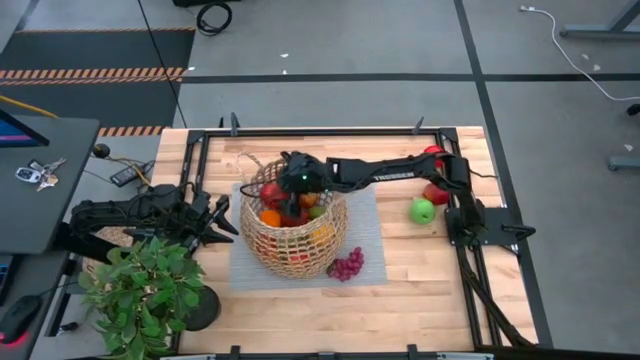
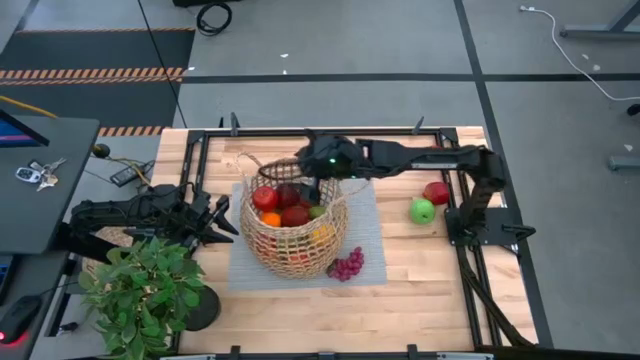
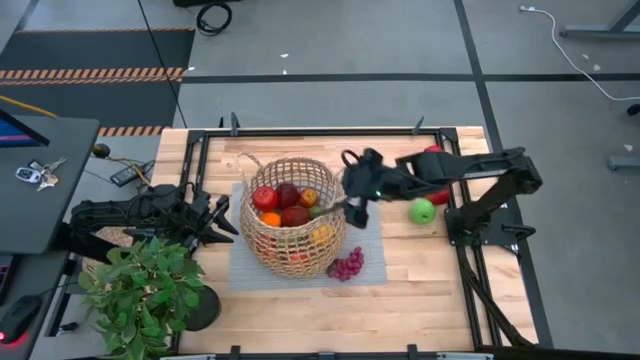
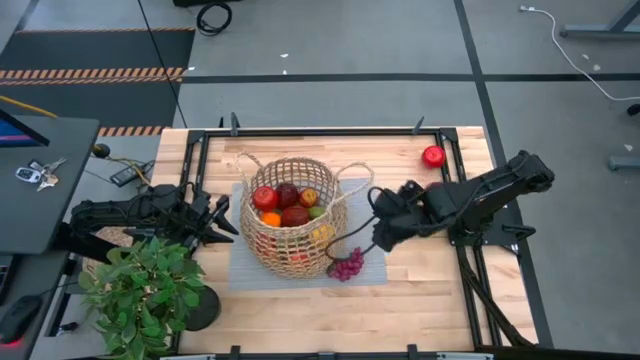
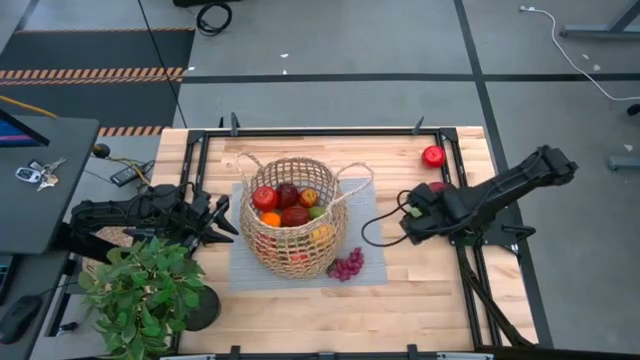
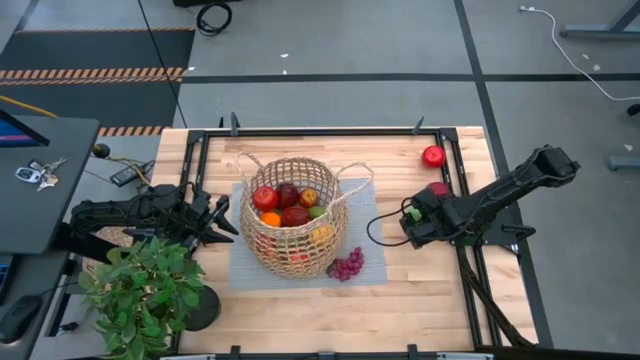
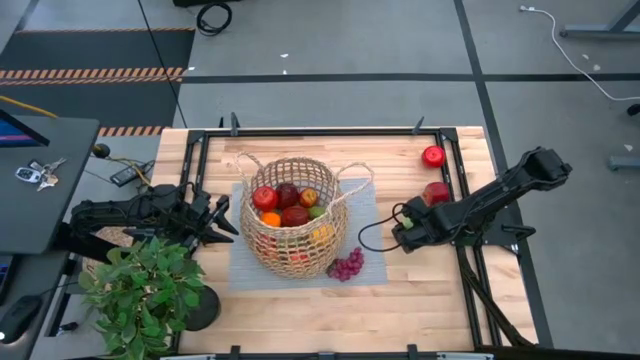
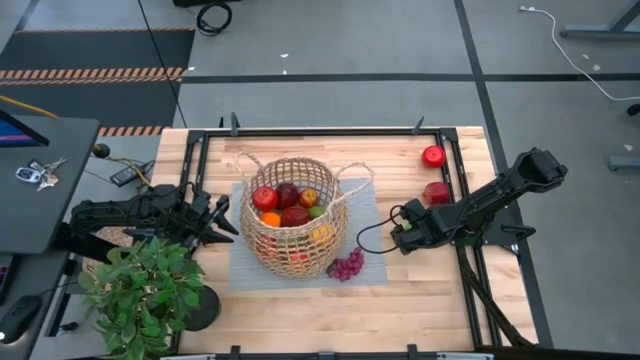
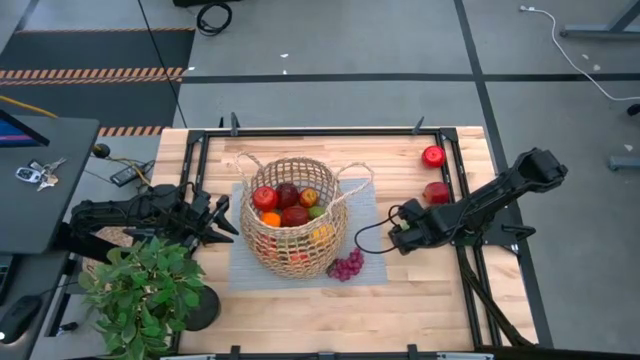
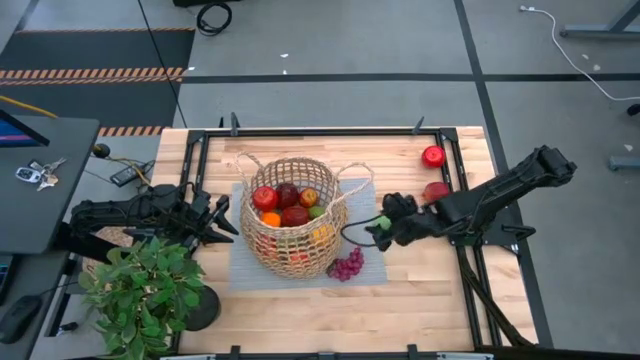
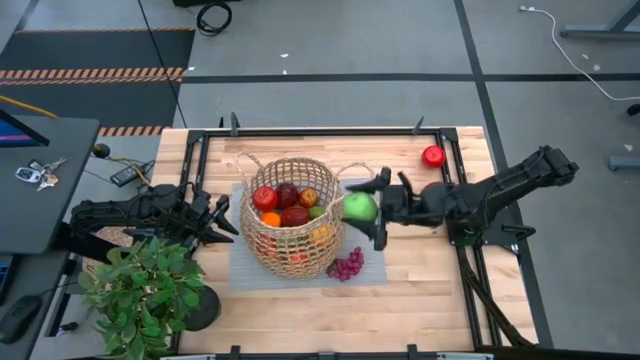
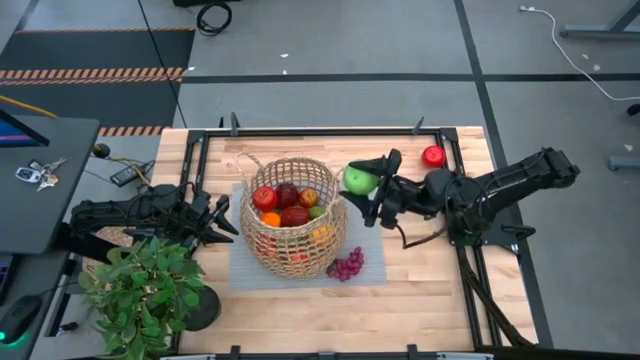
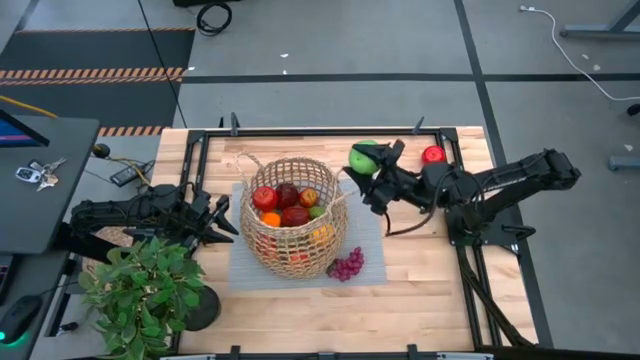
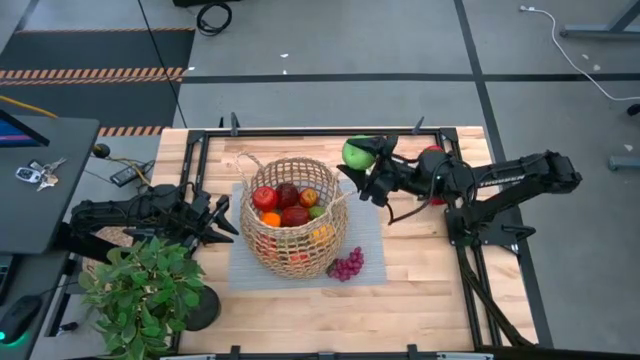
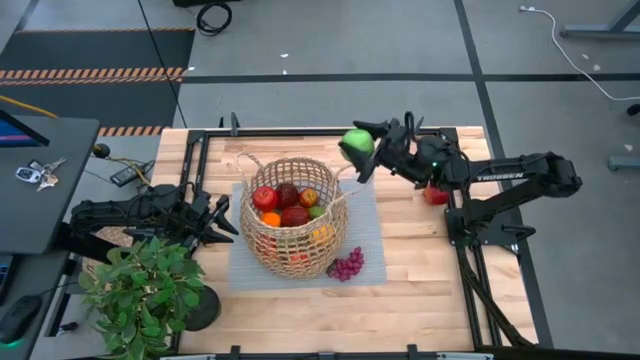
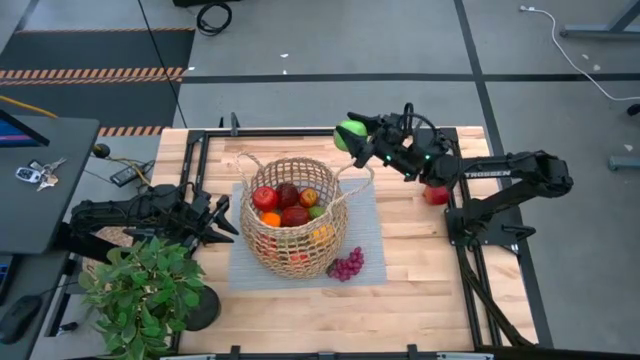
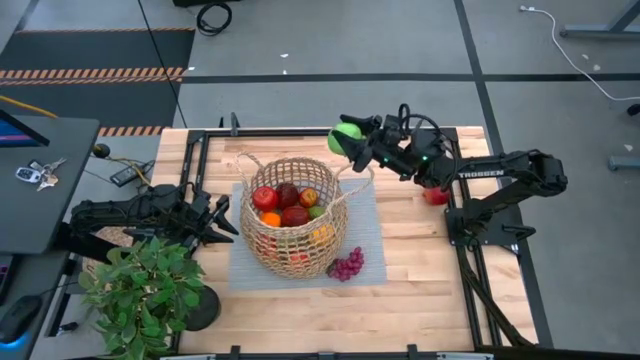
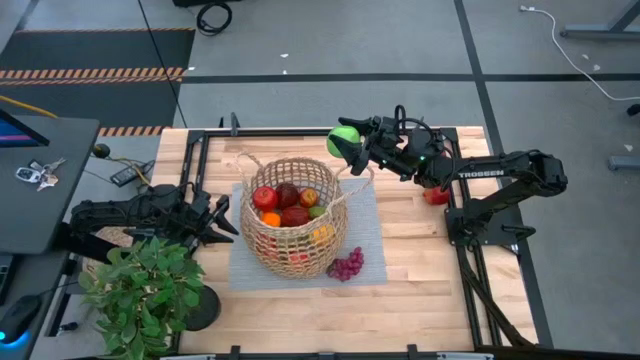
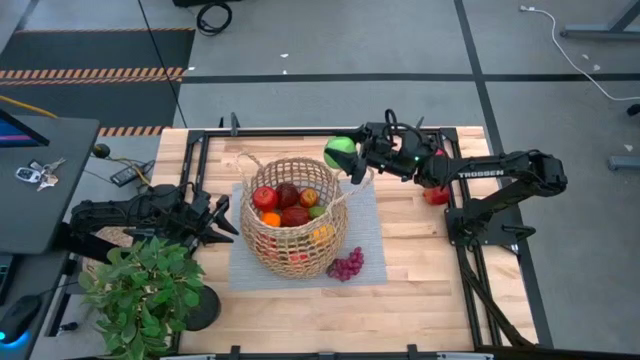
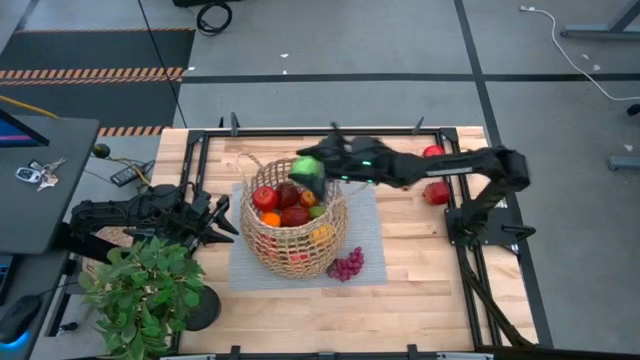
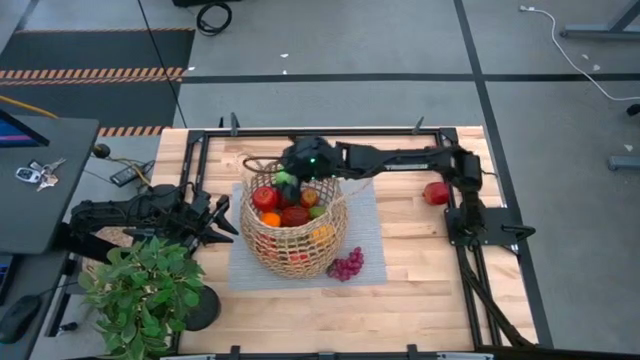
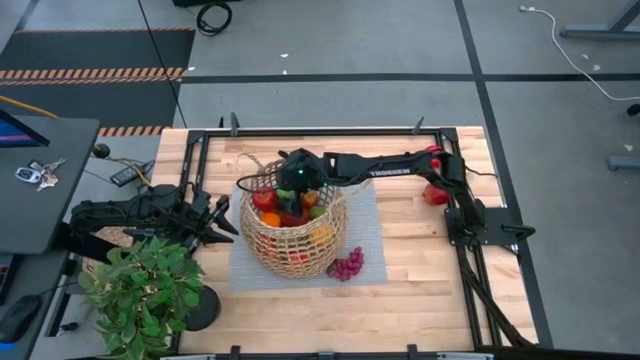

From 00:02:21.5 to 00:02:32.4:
Task: Build produce basket
Put the green apple into the brown basket

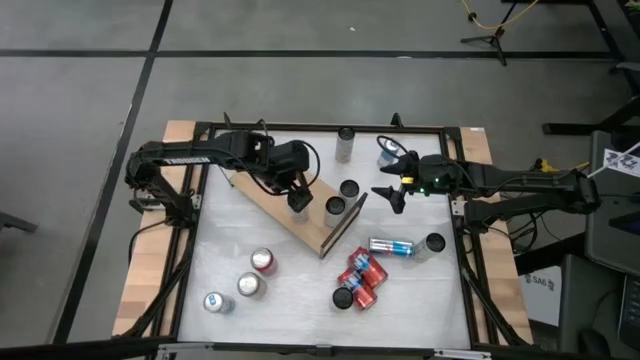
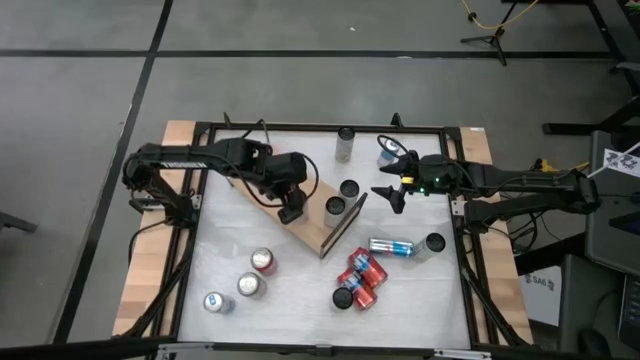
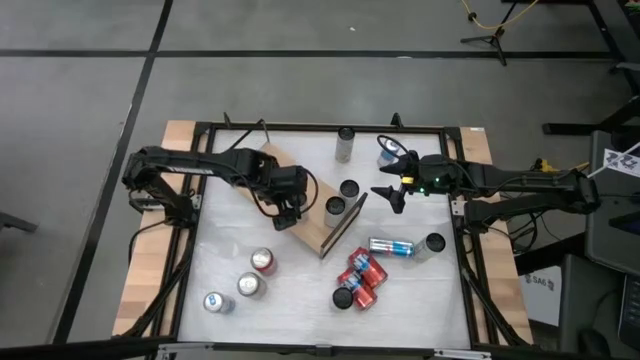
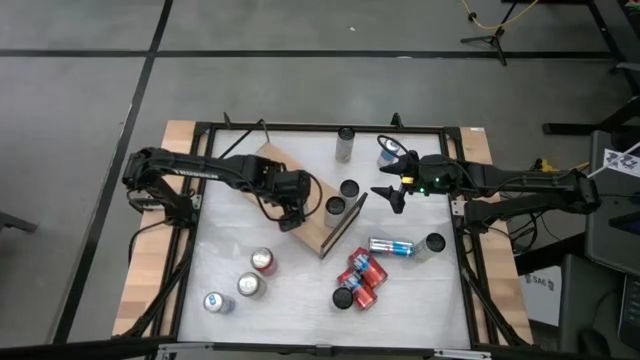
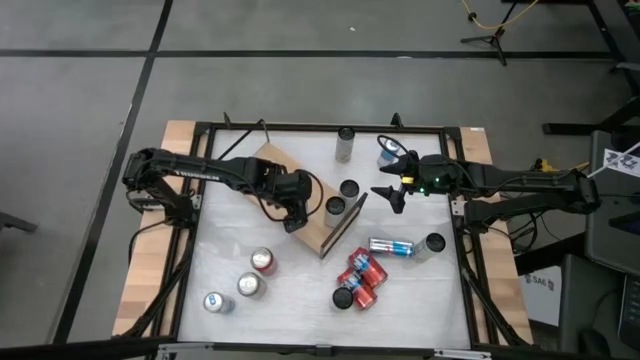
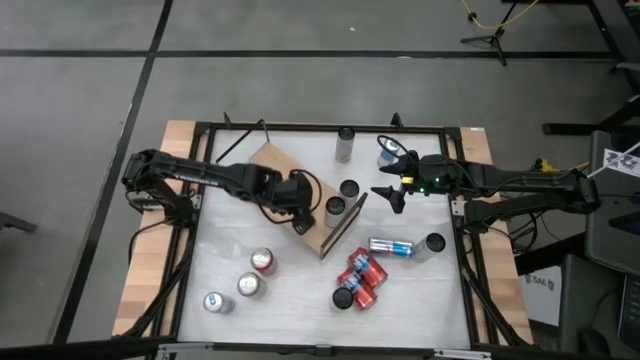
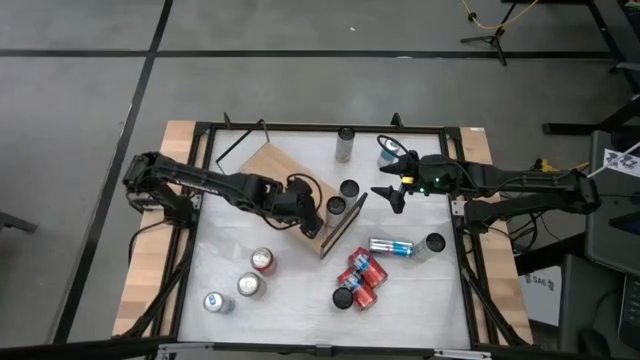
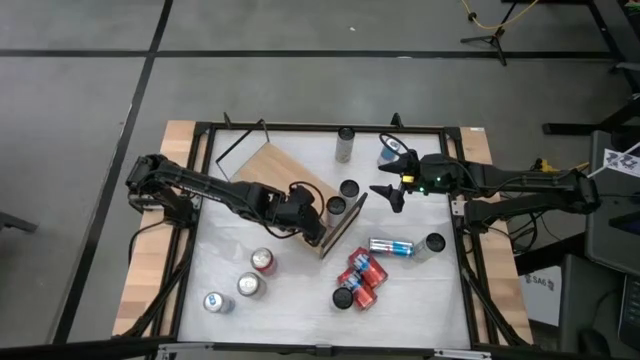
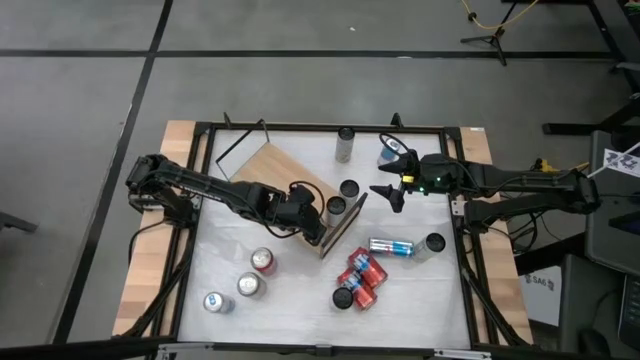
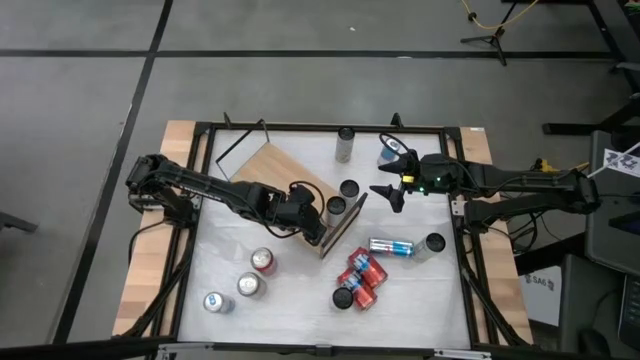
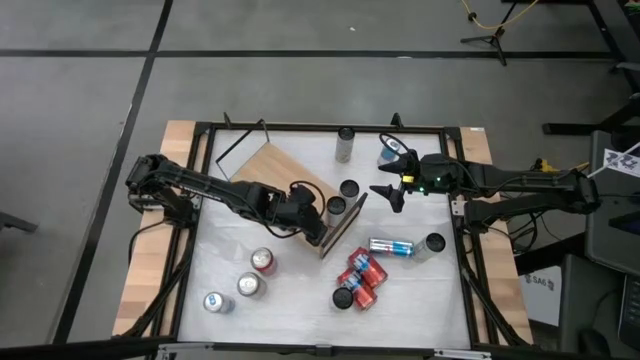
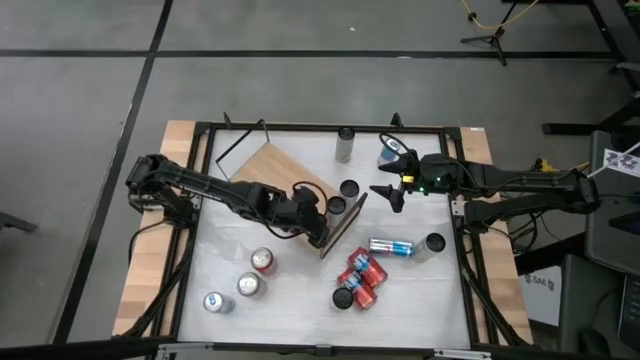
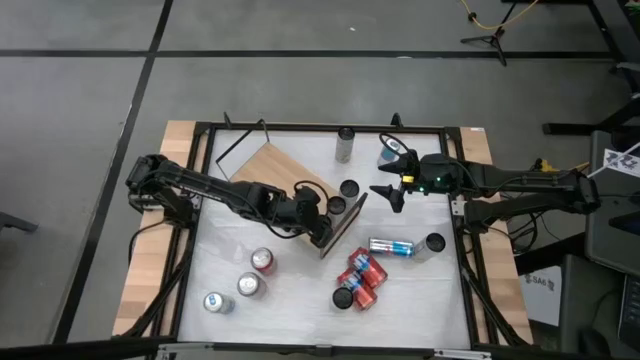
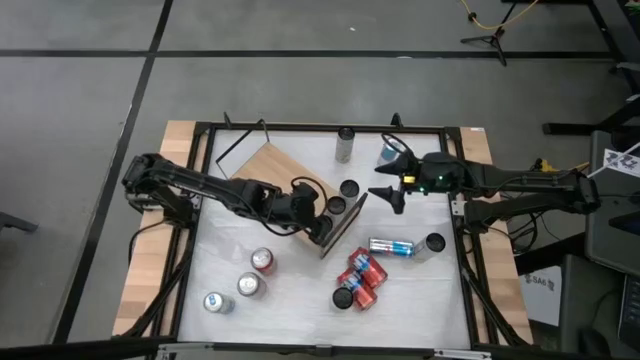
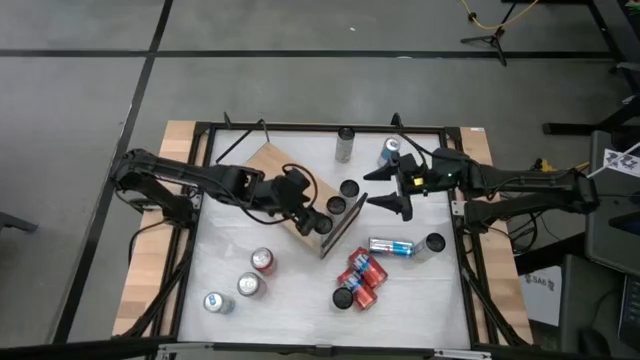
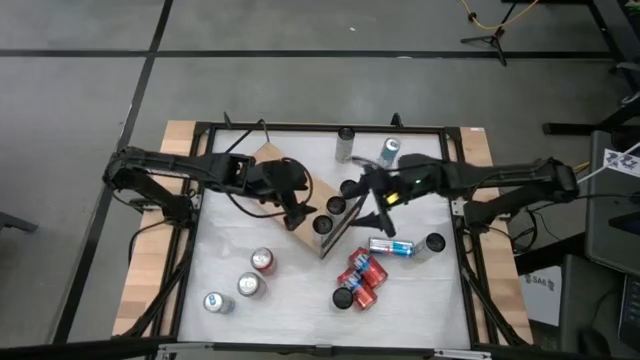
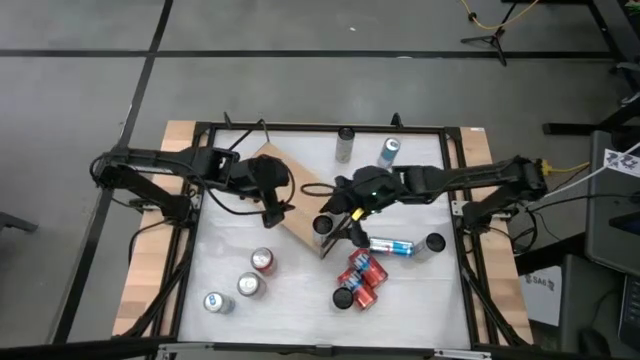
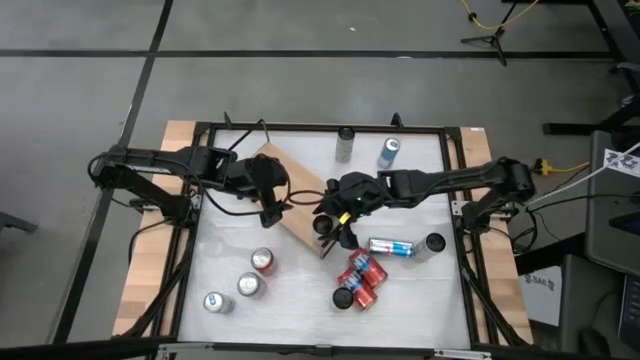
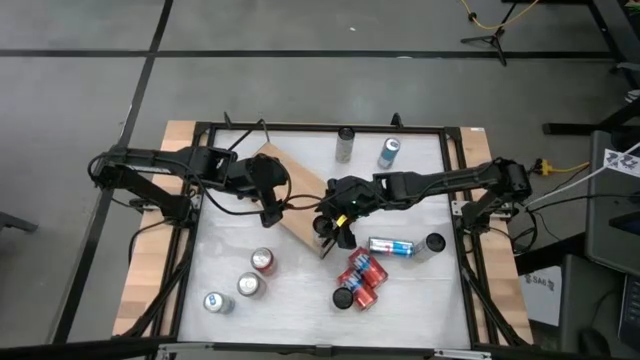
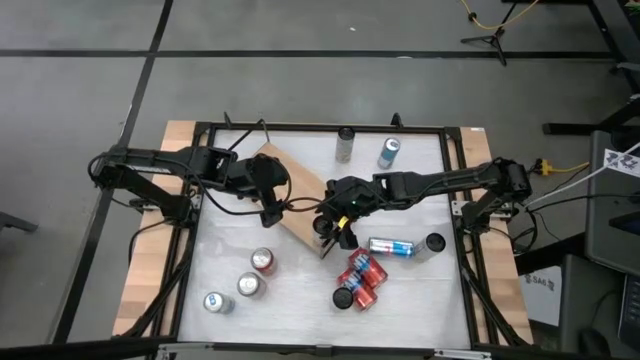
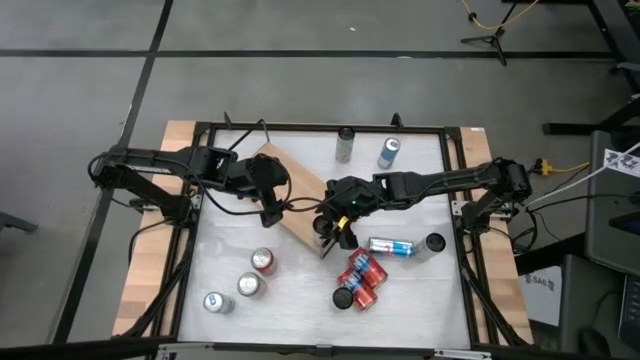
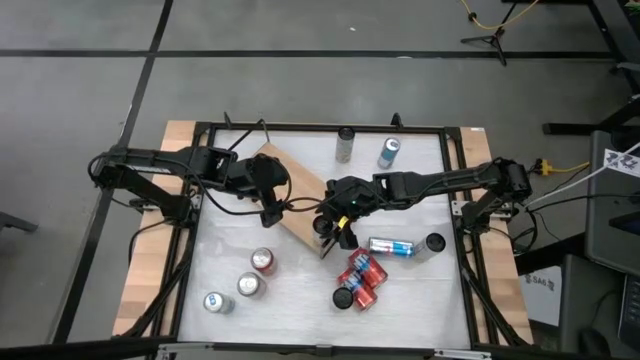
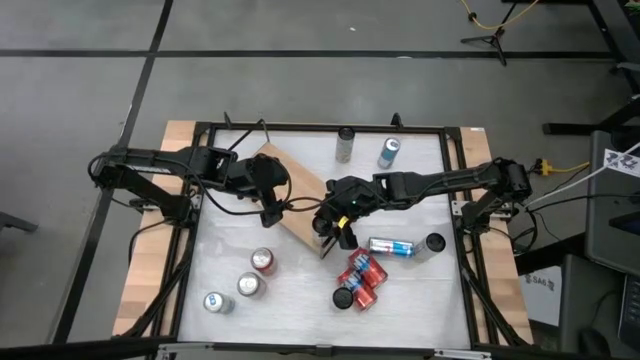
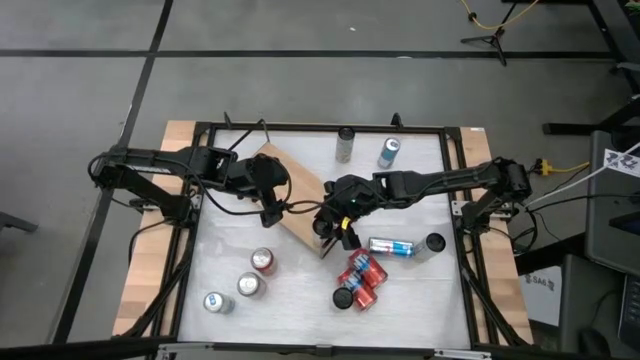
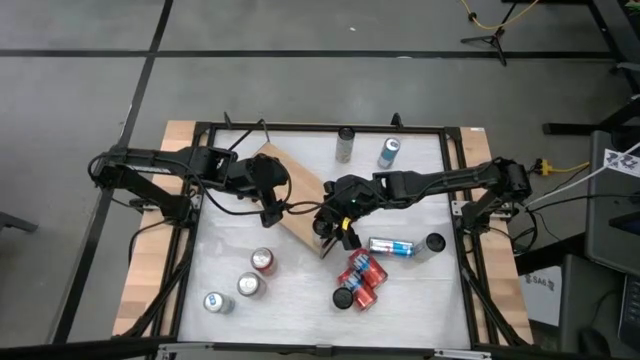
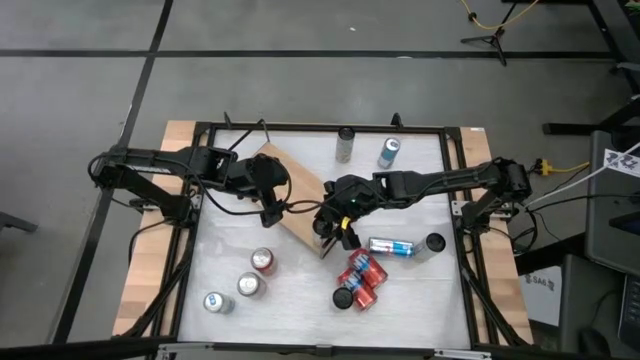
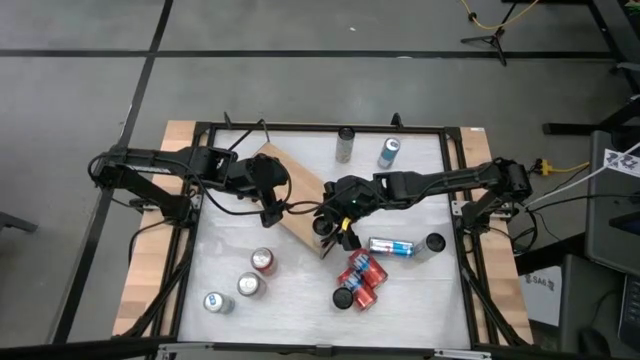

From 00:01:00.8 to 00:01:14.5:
Task: Place canned beverage on shelf
Put the white-pink soda can on the shelf aligned with the other white-pink soda cans
